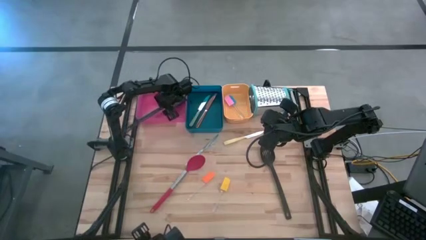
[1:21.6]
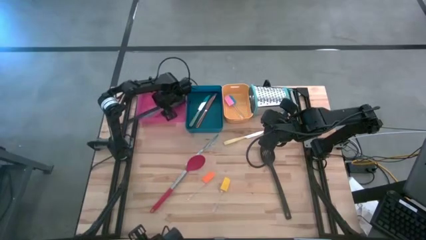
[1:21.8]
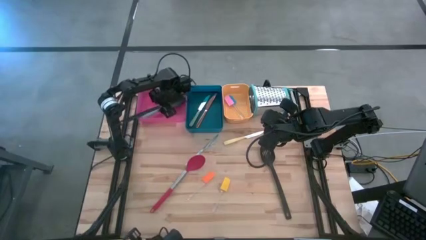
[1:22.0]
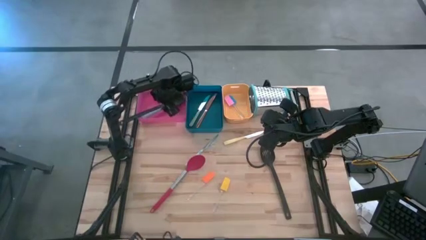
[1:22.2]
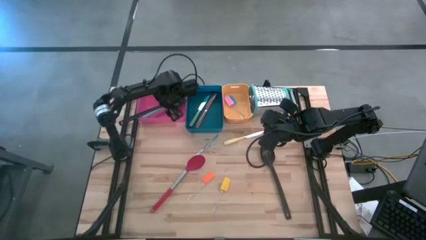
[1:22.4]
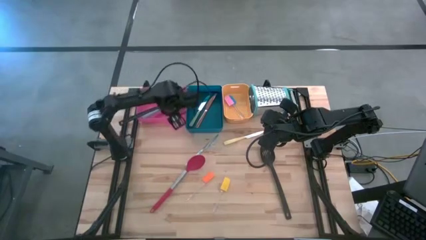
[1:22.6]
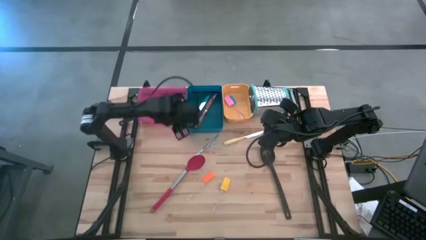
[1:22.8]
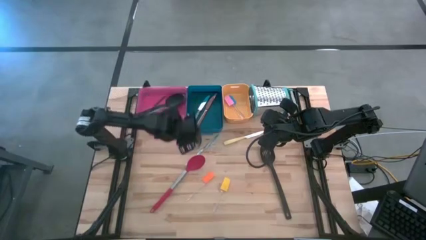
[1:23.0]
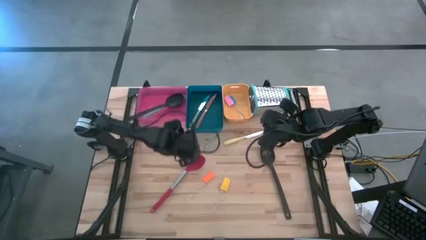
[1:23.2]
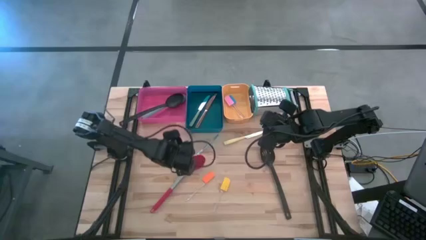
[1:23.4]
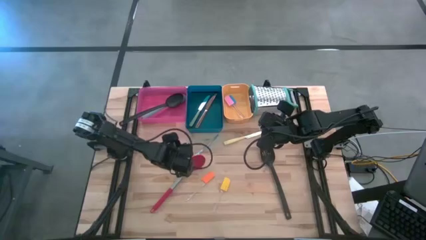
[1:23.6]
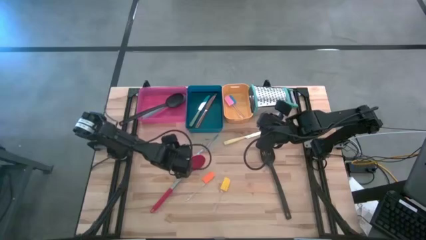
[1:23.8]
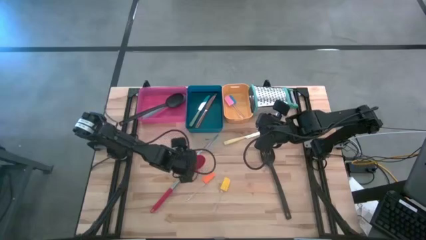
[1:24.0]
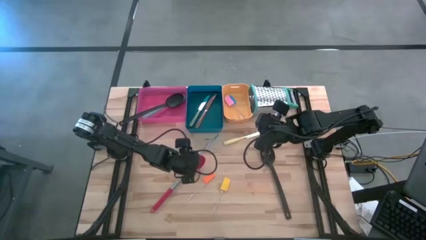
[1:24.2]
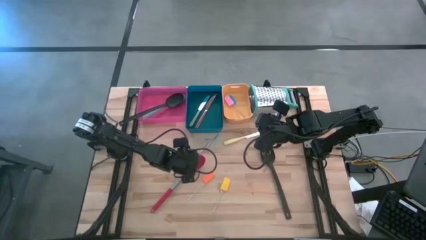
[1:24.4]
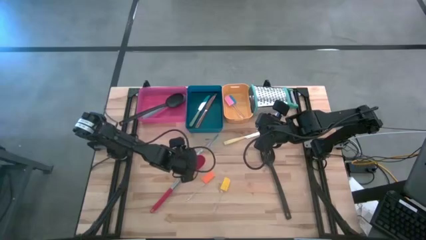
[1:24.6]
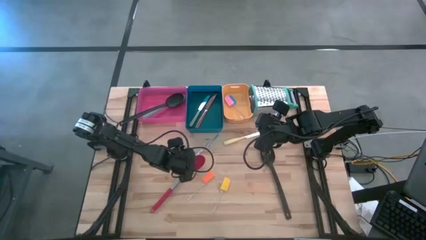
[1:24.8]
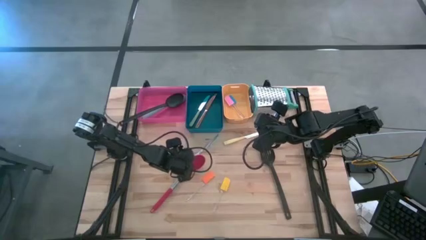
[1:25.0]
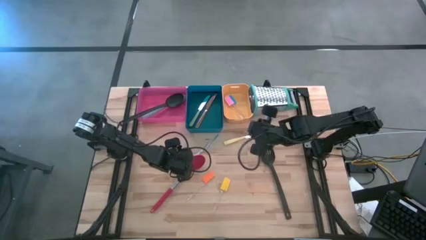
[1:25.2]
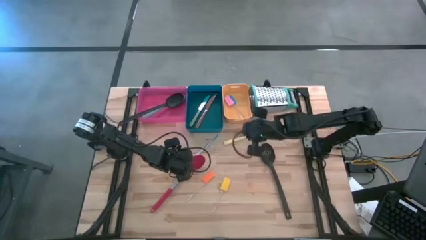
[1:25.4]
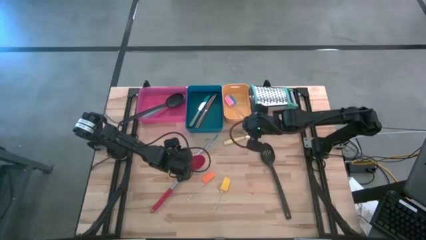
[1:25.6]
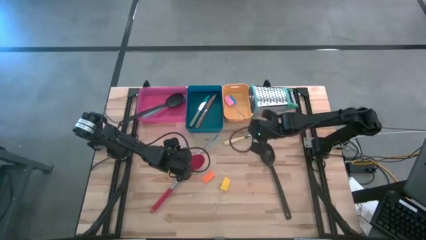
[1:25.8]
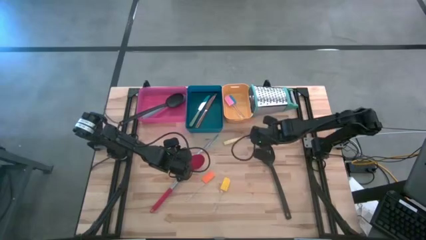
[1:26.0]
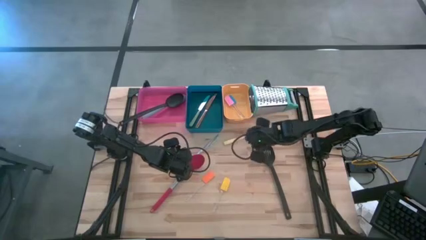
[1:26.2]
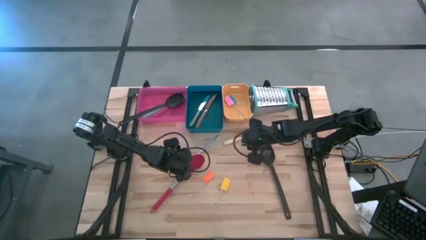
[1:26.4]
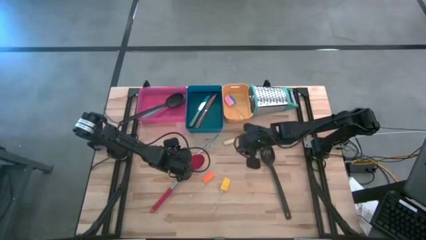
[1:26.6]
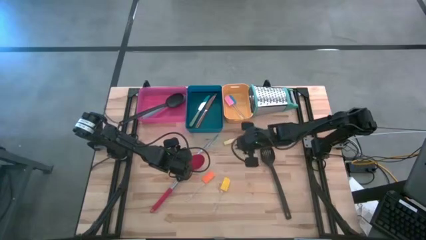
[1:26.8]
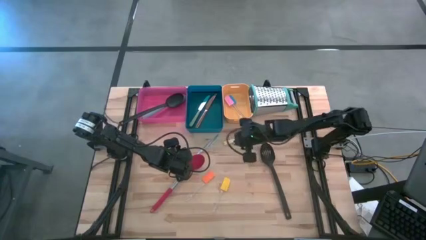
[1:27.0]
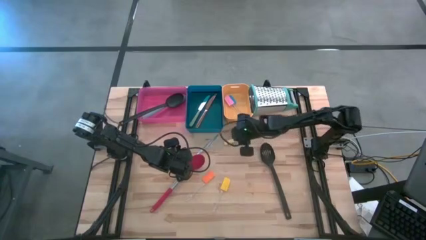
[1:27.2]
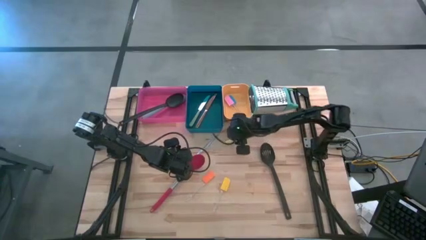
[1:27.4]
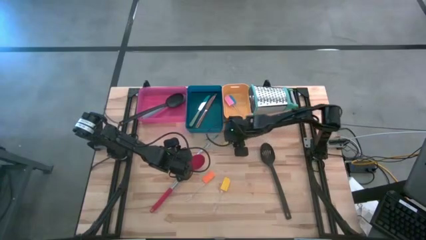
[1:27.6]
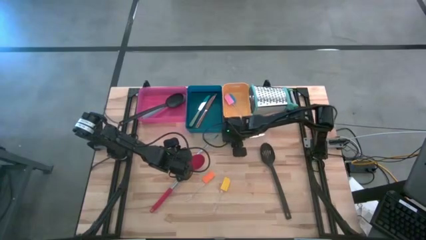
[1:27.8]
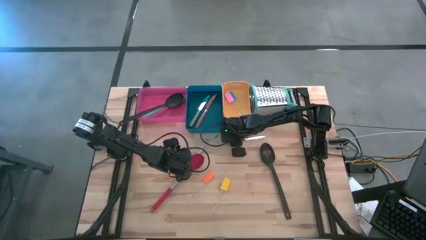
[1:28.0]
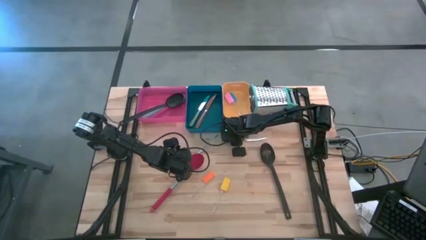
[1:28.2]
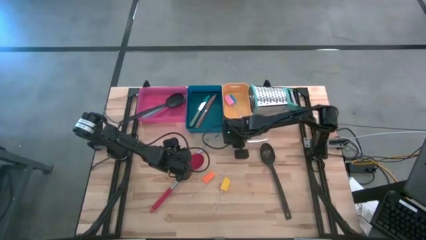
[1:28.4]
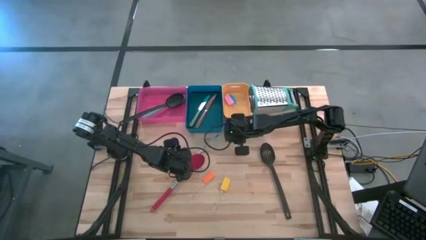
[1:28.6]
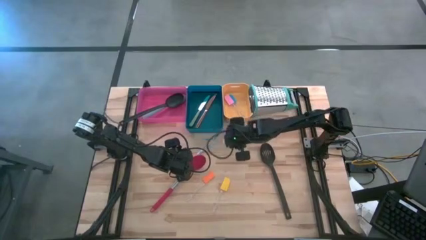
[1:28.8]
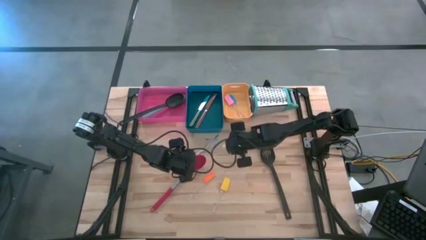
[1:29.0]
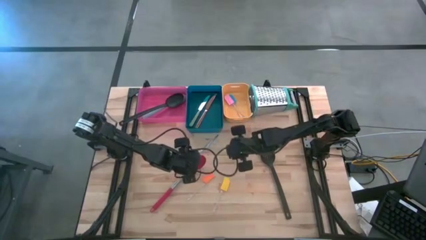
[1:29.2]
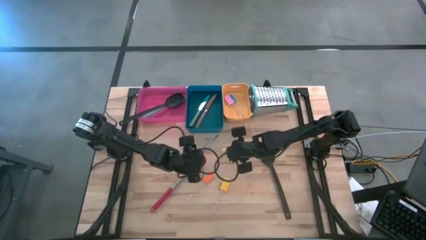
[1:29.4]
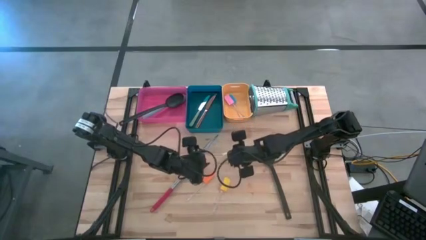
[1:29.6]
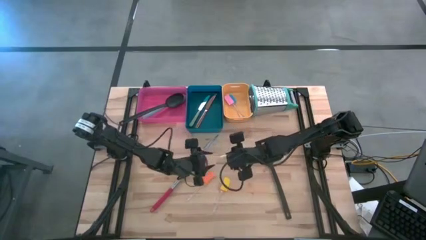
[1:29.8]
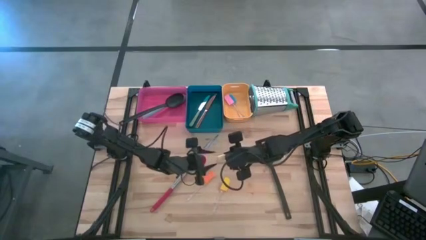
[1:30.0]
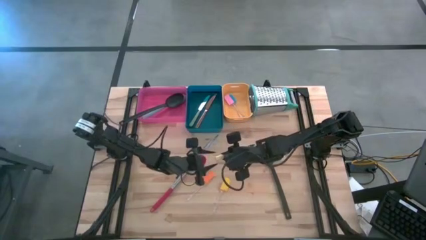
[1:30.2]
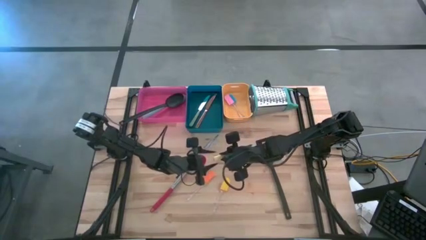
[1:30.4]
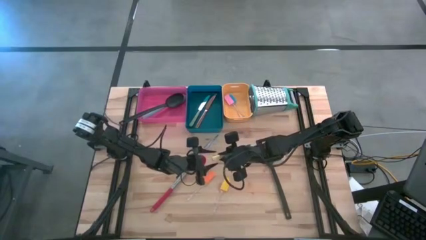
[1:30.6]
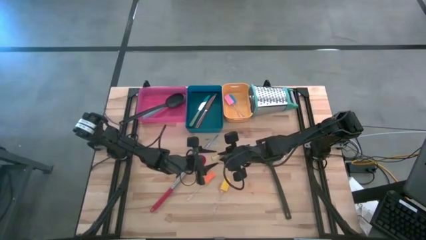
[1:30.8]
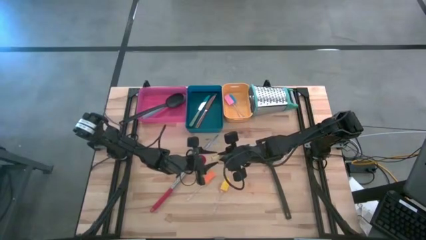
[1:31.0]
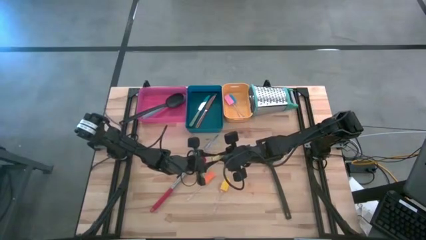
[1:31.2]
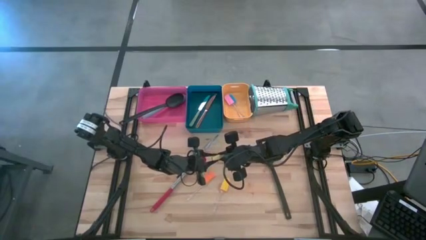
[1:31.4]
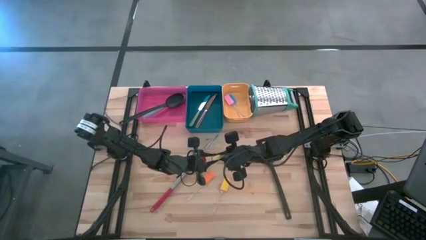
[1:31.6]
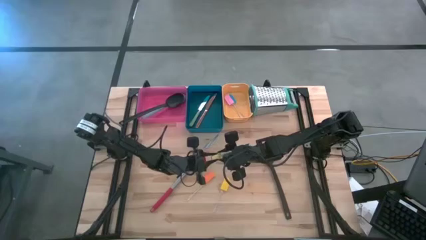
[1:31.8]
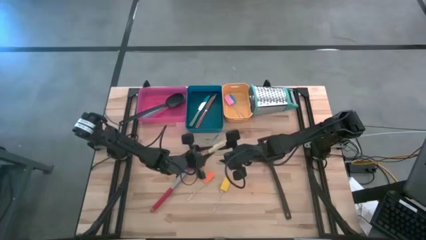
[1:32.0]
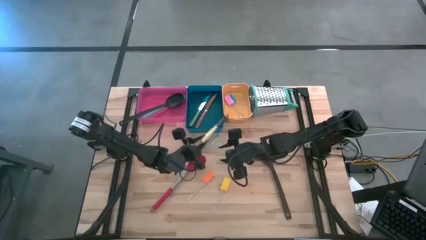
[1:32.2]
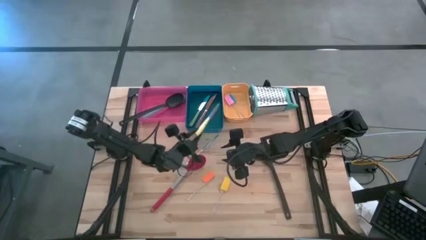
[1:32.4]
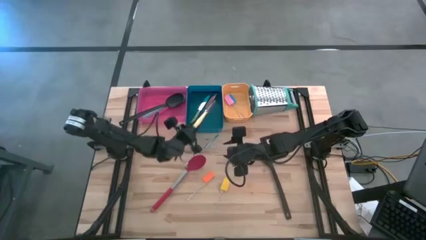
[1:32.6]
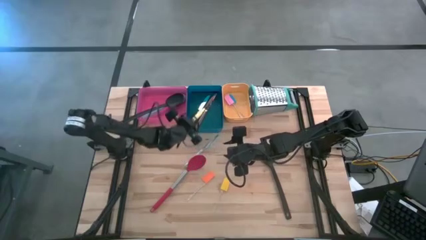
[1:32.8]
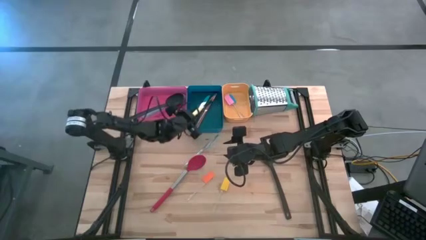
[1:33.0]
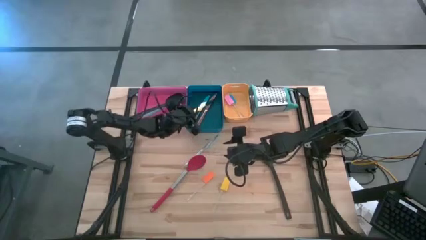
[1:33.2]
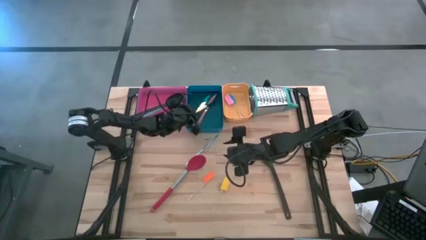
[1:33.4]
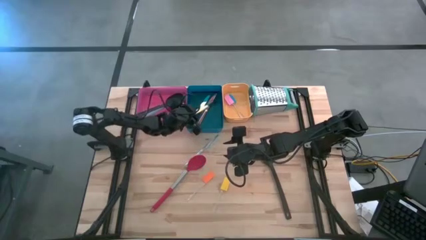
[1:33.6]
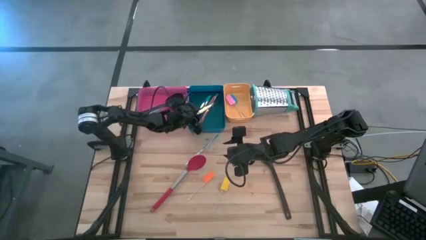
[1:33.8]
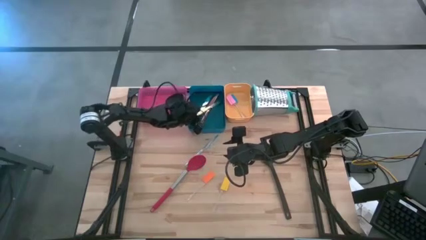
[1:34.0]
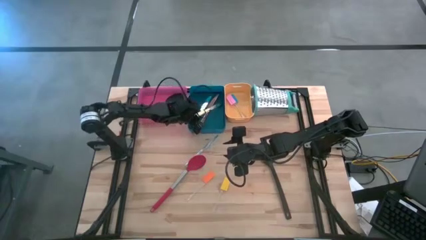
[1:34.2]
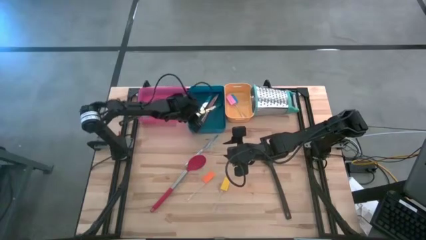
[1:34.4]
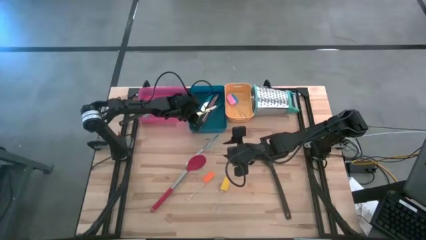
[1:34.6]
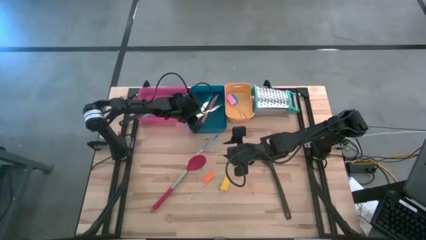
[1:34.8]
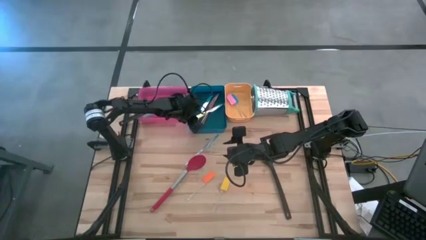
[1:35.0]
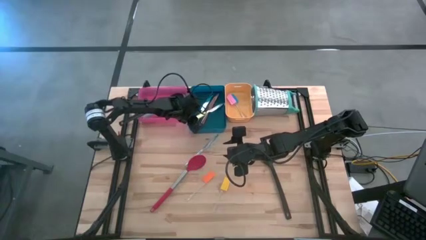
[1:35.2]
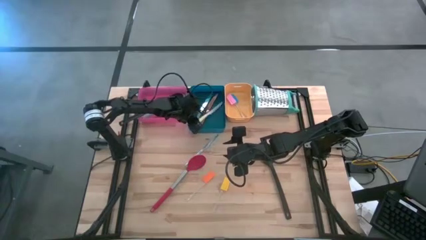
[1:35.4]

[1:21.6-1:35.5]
Task: Pick & Place Kitchen Items
Put the yellow knife into the blue bin

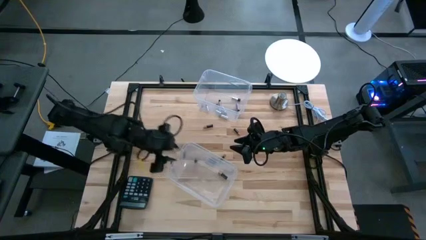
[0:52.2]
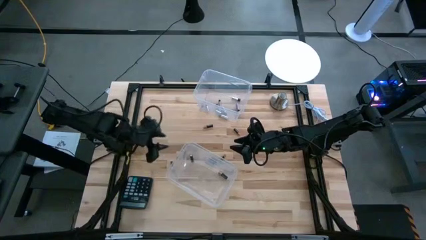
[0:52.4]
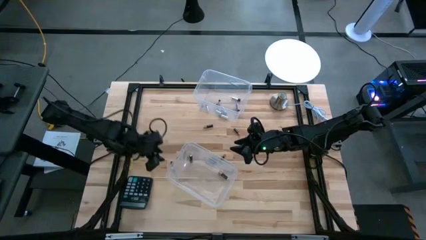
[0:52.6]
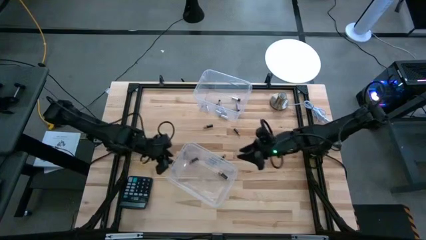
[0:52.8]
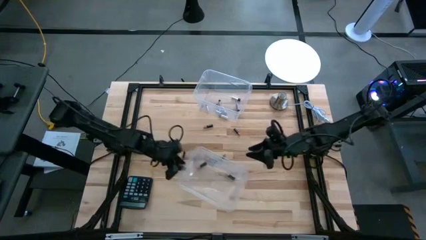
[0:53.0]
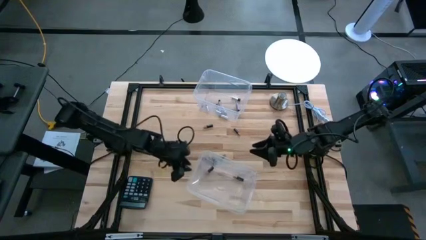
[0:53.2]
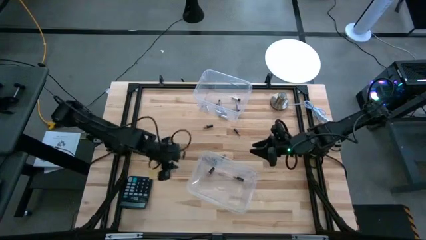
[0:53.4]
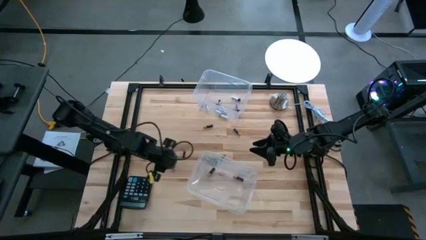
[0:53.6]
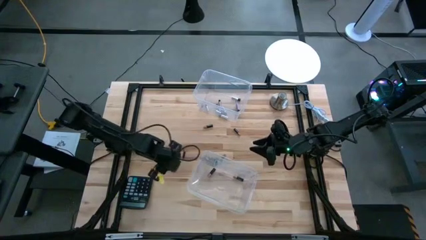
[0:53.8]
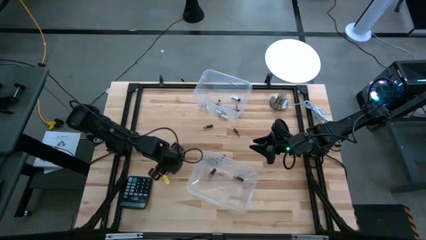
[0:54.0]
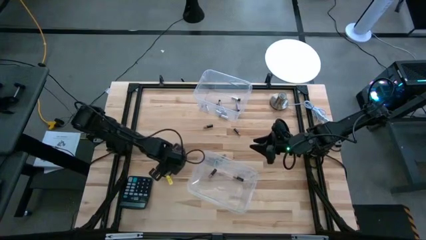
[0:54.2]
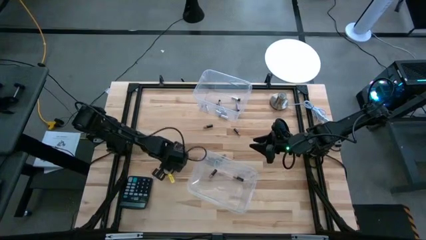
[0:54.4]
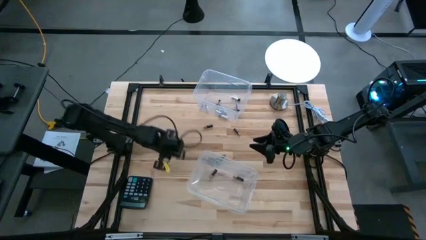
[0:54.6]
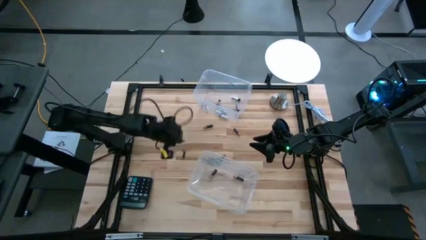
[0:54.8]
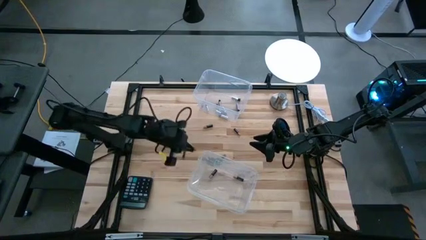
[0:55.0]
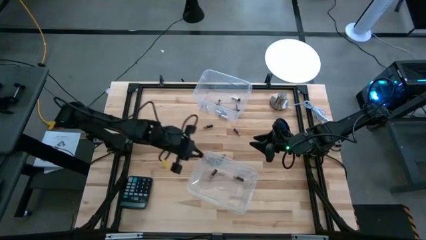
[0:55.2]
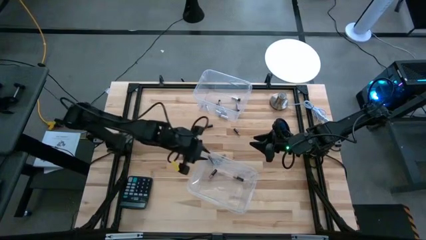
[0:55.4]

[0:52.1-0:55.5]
Task: Sort batteries
Put the black battery into the bottom transparent bin

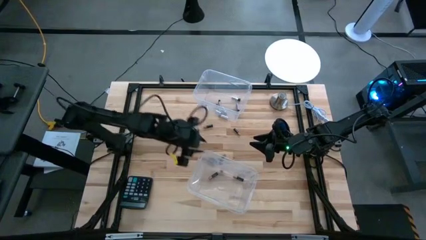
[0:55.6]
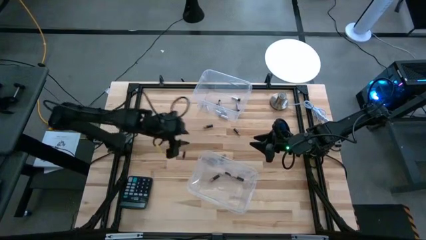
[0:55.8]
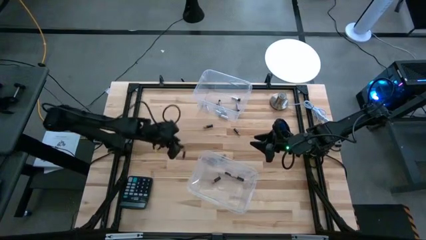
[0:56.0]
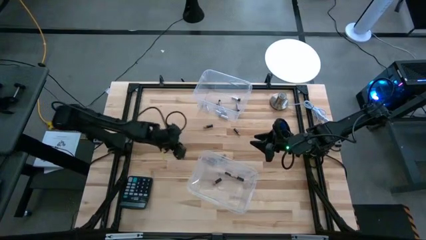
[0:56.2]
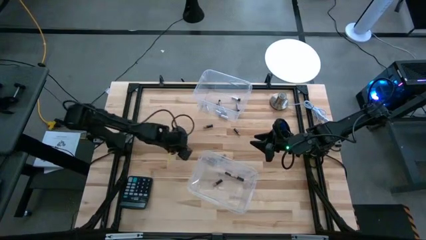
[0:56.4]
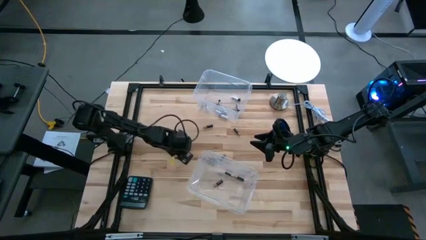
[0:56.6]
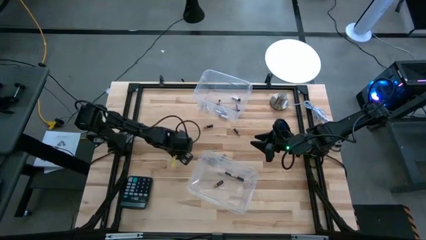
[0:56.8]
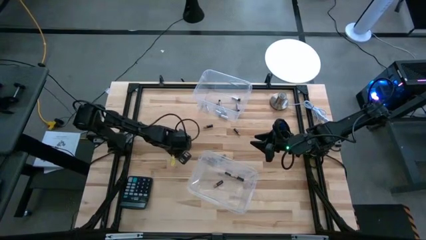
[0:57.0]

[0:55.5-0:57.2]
Put the black battery into the bottom transparent bin
